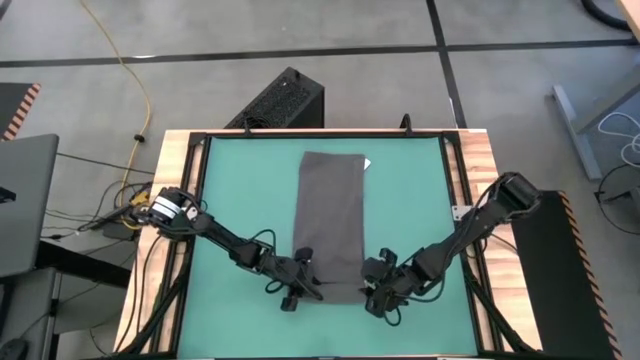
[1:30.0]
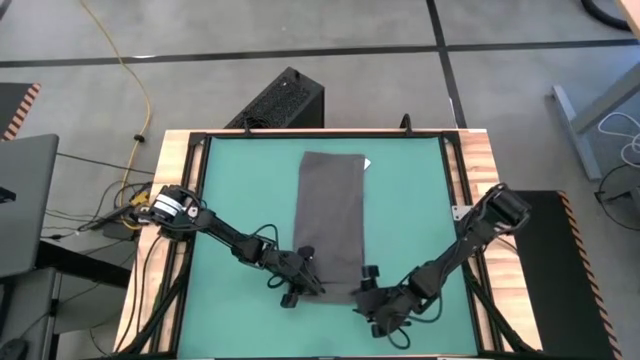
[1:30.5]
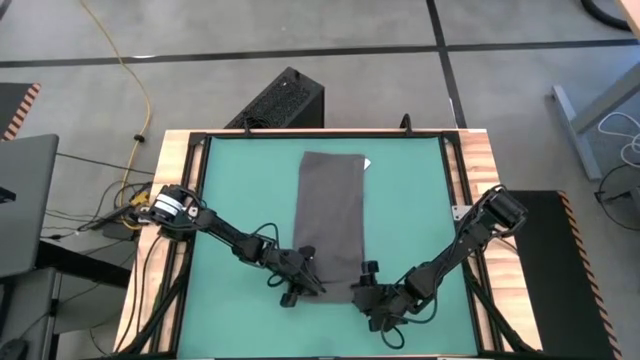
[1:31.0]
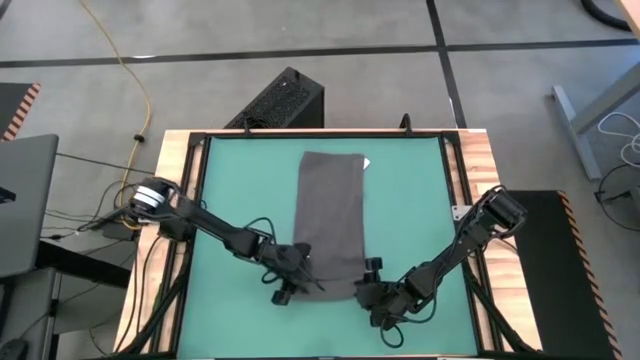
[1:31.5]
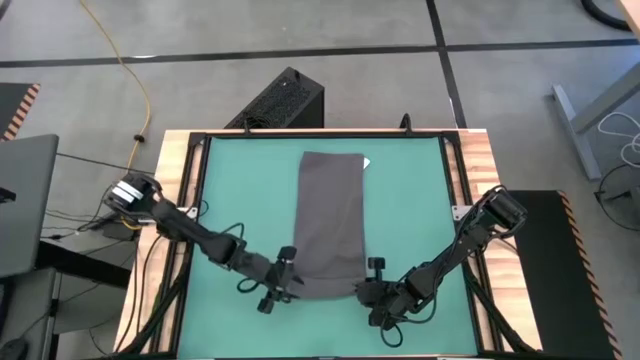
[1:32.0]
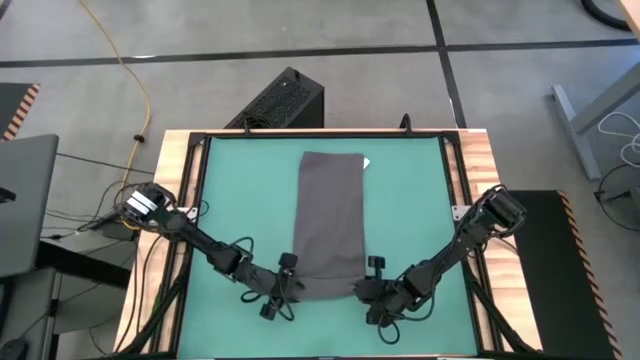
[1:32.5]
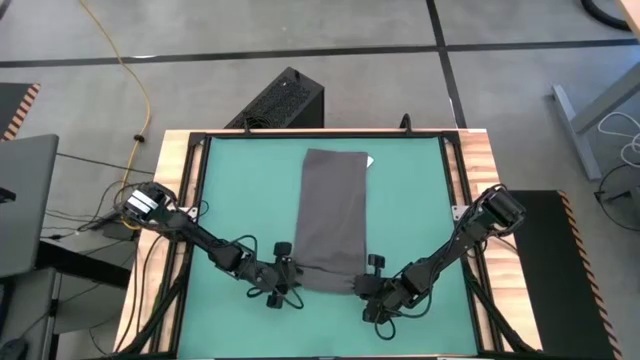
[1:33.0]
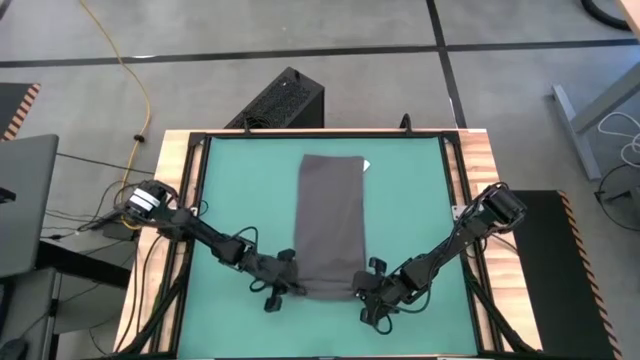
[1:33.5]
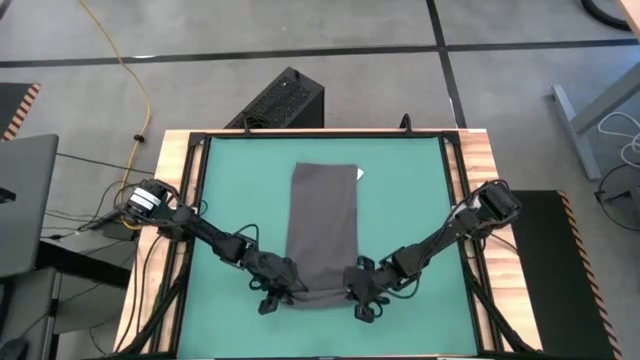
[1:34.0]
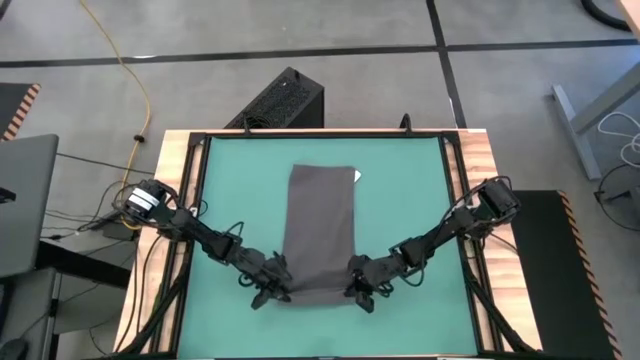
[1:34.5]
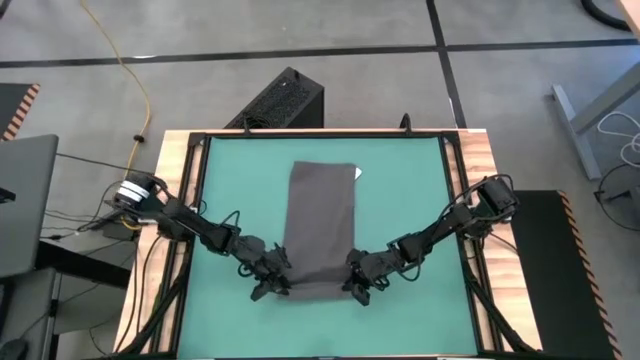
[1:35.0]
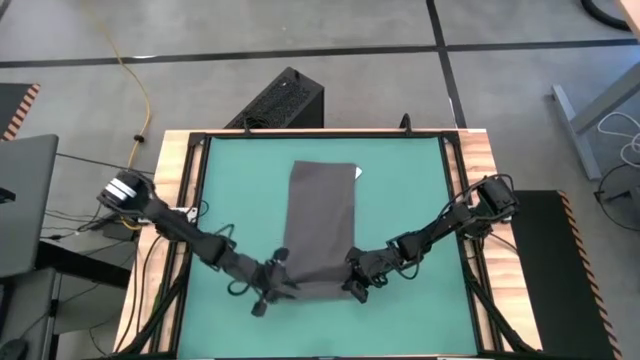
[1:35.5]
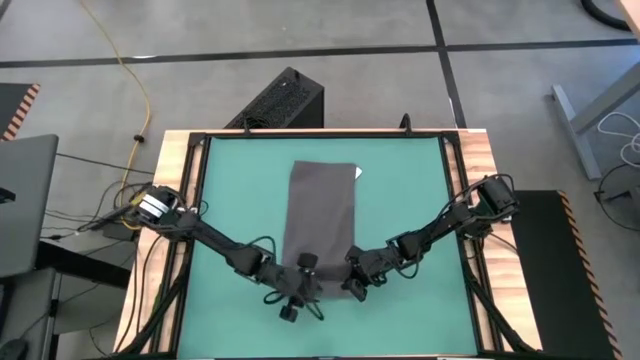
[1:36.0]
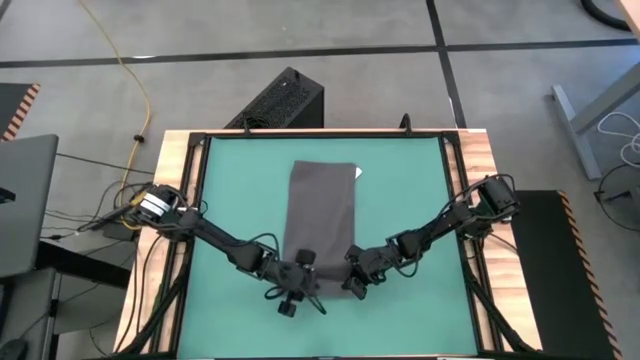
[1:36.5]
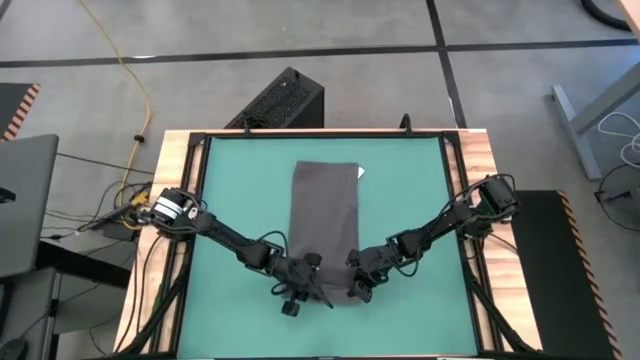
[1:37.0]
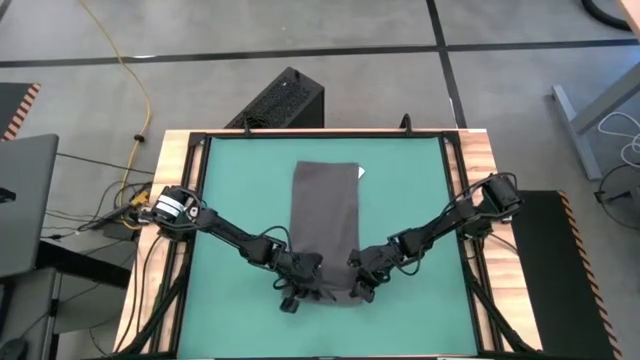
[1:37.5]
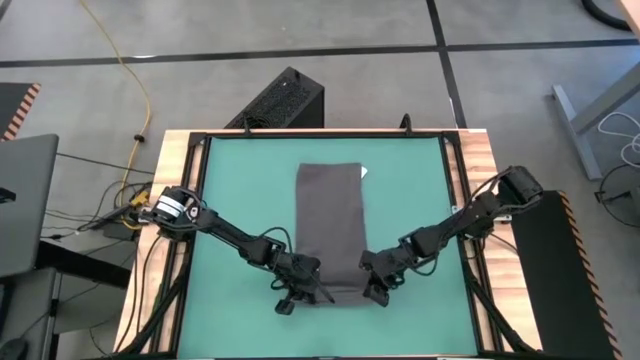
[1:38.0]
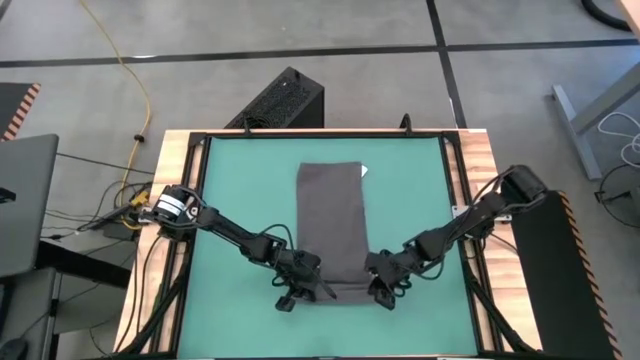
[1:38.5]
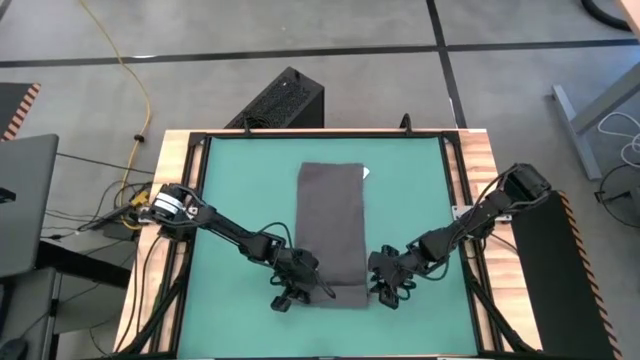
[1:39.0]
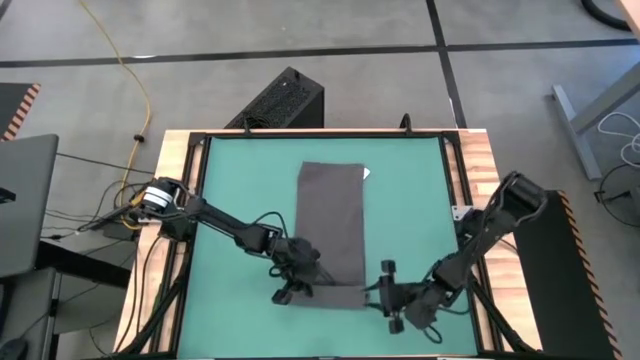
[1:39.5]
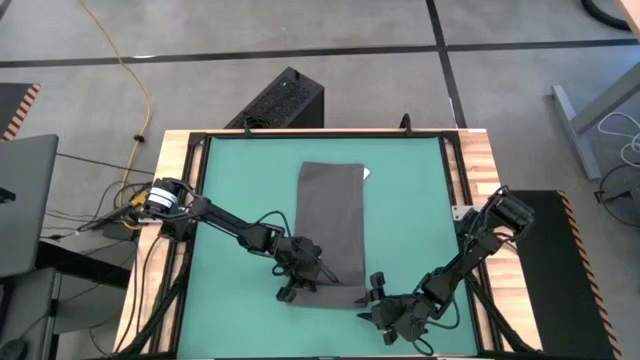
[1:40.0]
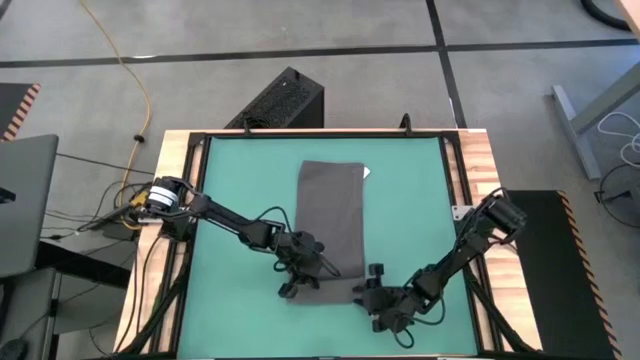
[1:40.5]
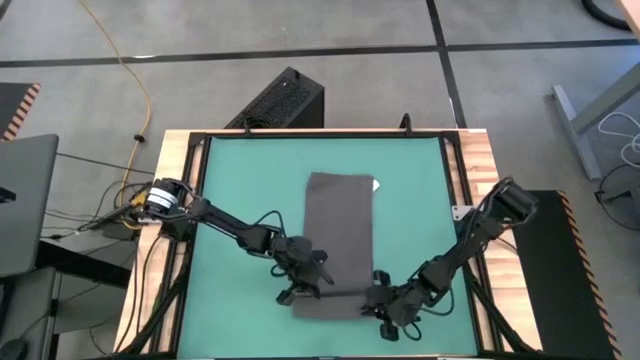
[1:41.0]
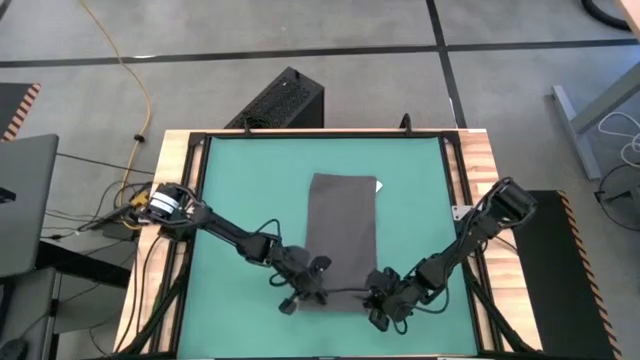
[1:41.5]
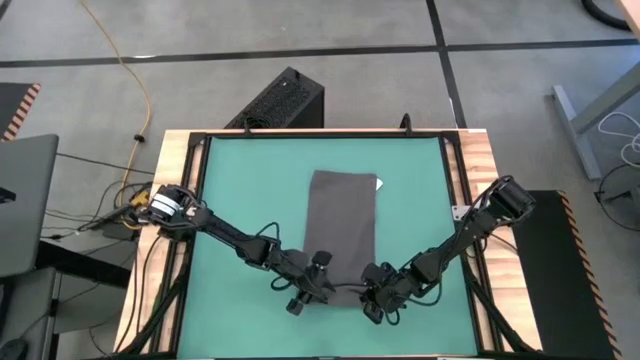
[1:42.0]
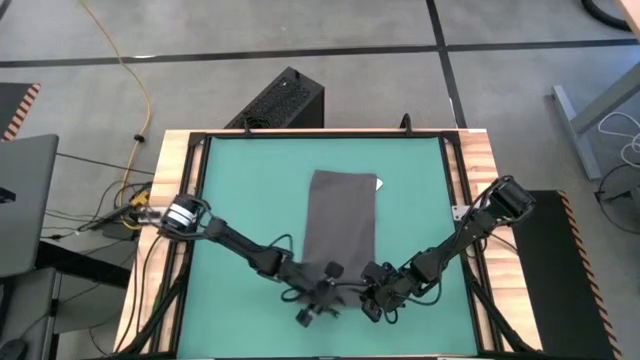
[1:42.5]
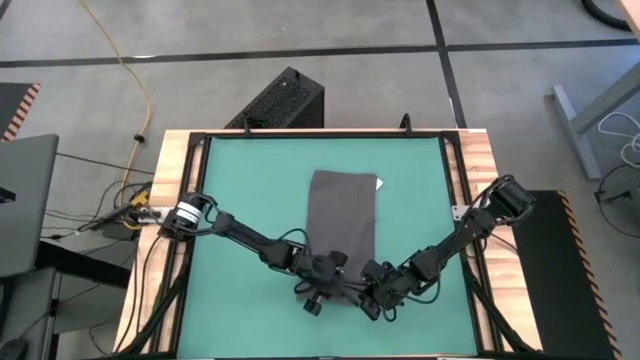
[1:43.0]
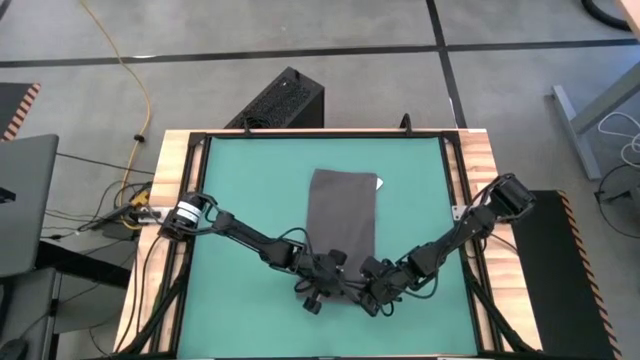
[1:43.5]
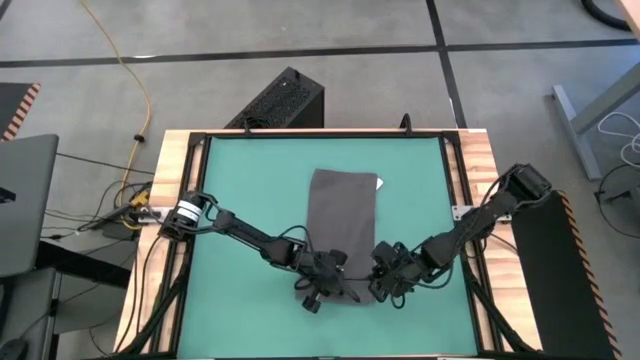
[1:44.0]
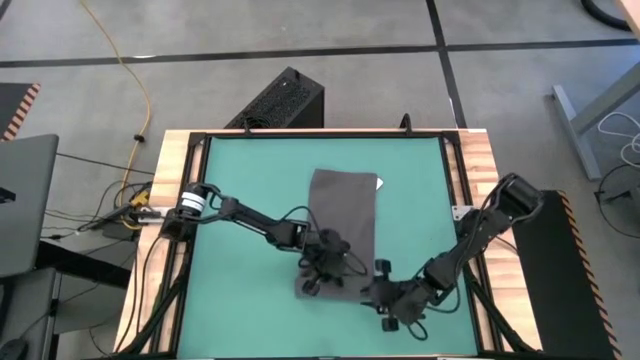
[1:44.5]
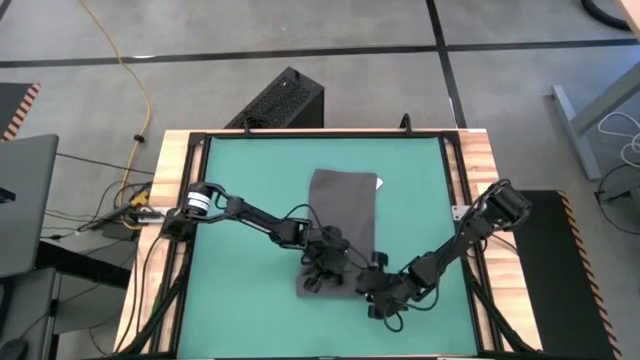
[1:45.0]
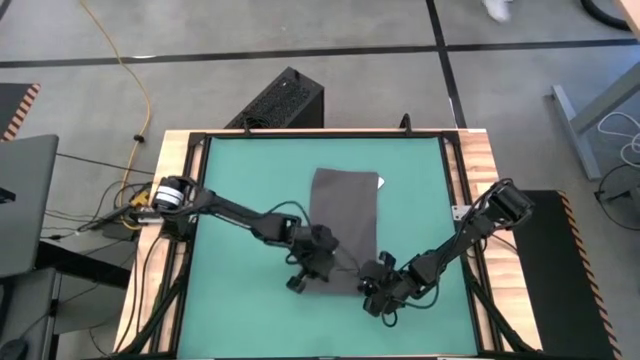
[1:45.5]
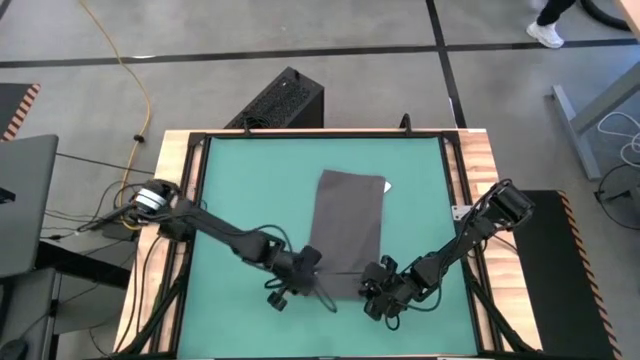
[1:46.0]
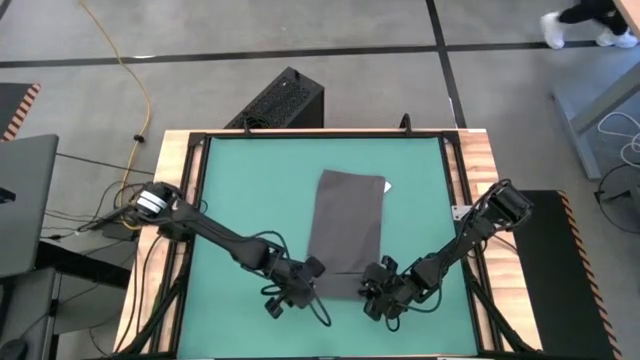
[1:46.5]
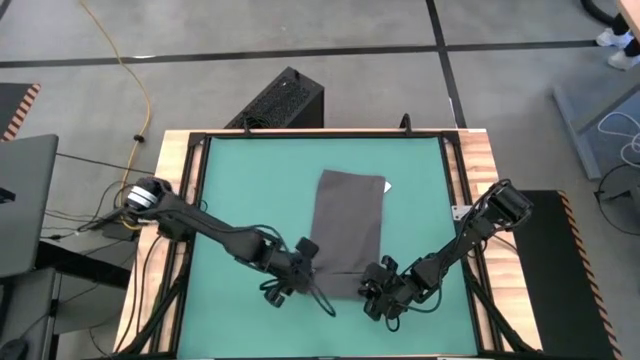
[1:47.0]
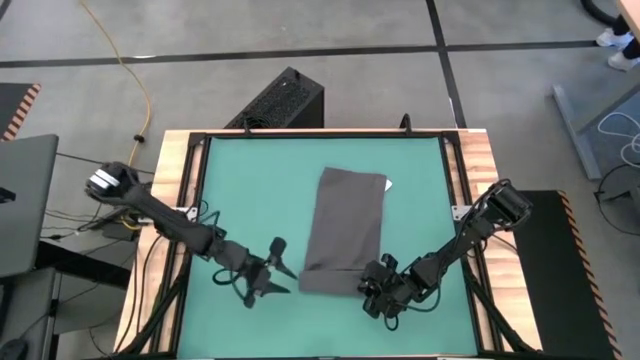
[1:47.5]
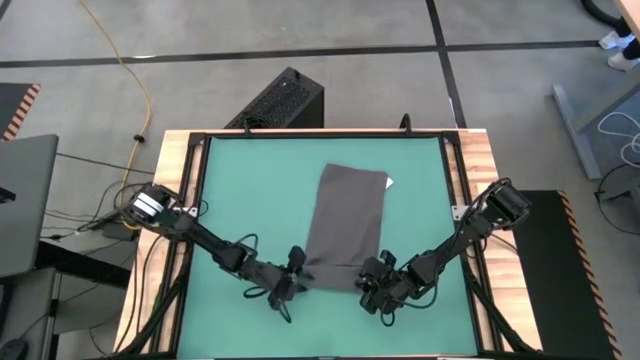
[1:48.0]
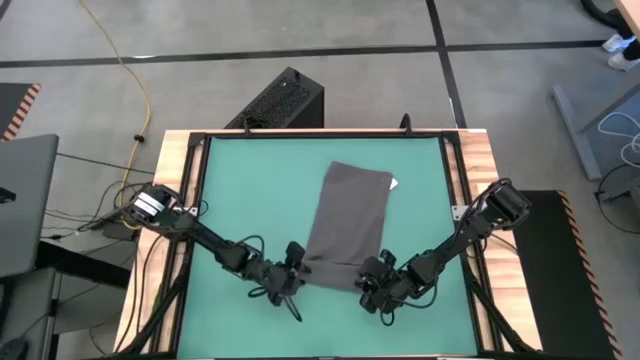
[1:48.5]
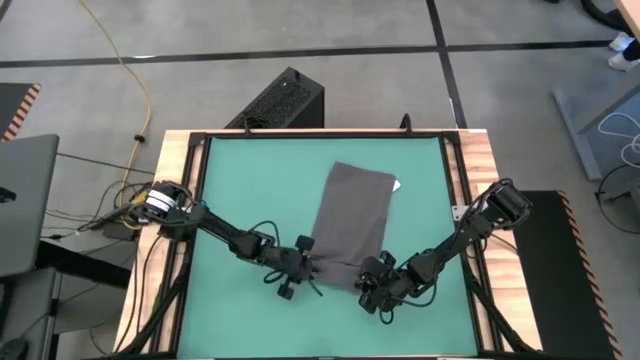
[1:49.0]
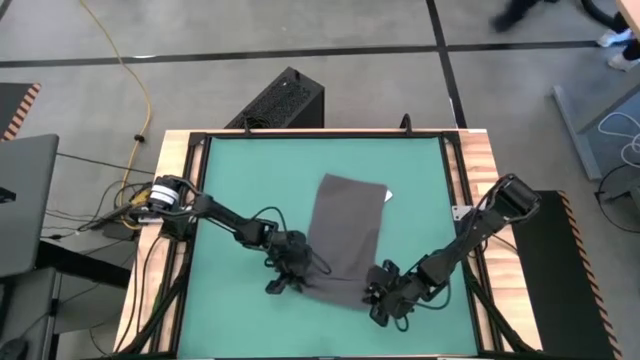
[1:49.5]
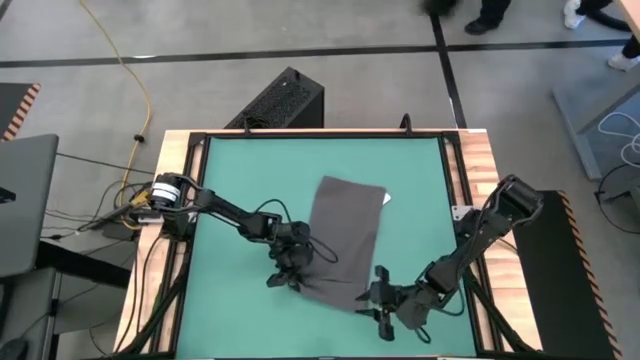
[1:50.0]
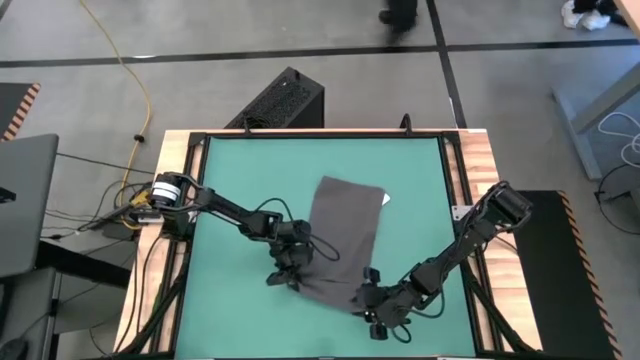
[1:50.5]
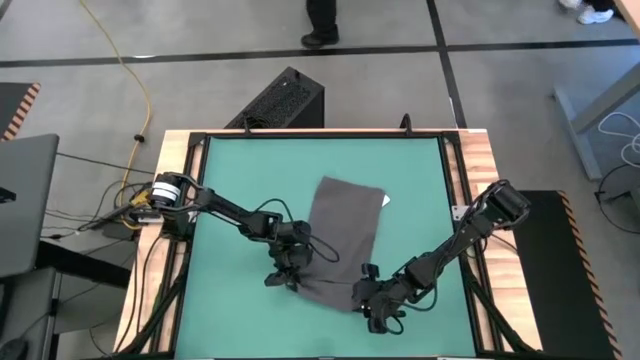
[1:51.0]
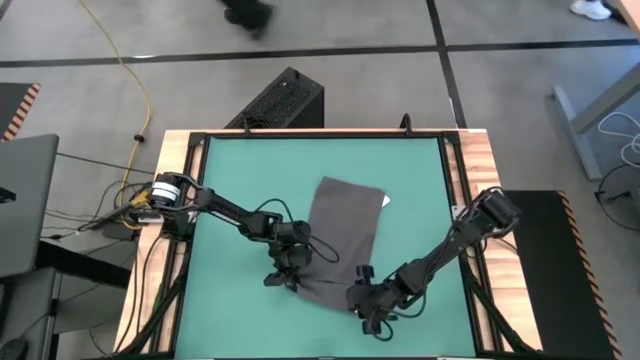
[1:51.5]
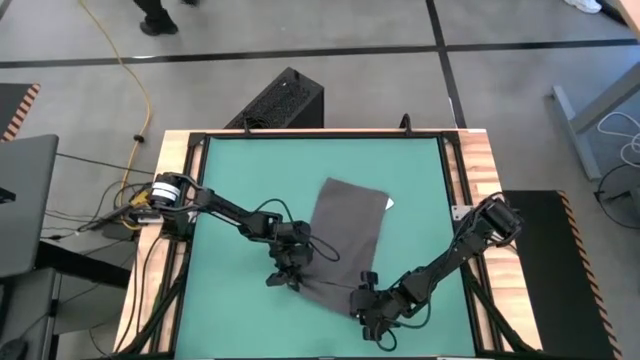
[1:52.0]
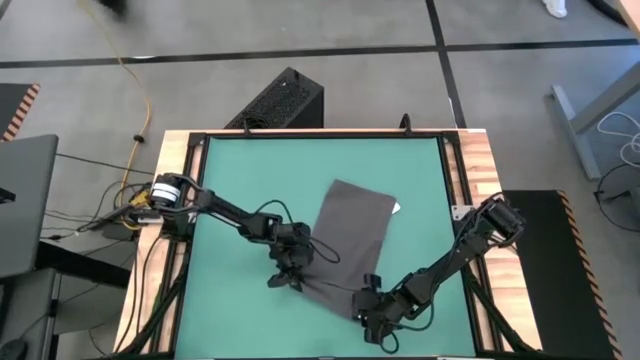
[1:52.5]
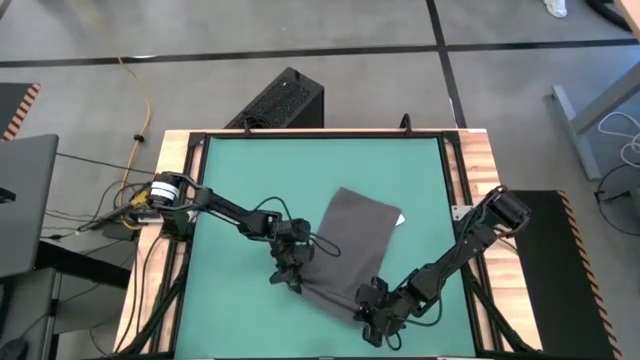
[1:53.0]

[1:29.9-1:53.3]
Task: Roll towel into tight, uniform cylinder
Roll the gray towel
